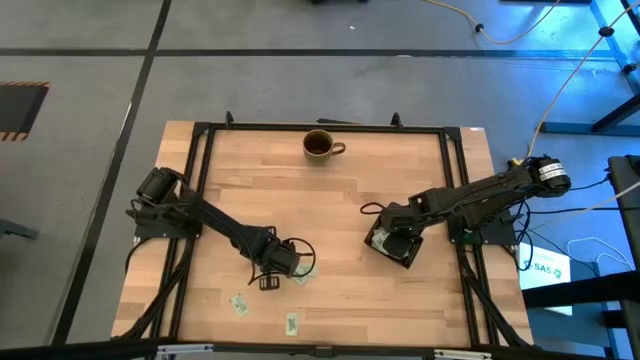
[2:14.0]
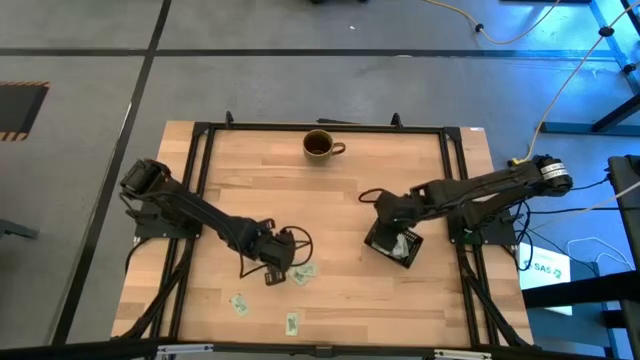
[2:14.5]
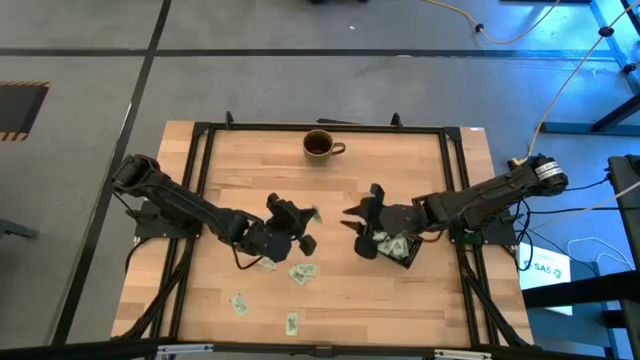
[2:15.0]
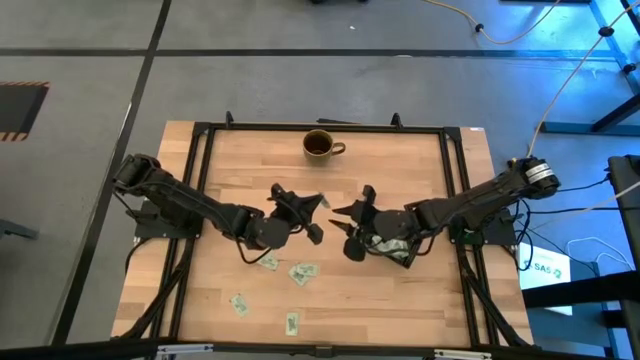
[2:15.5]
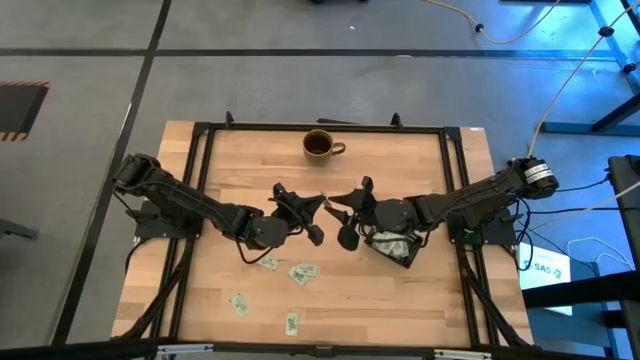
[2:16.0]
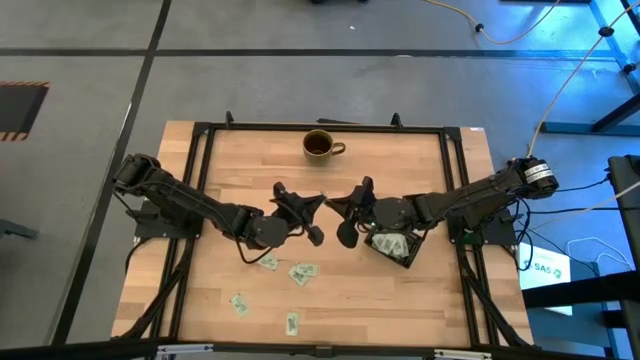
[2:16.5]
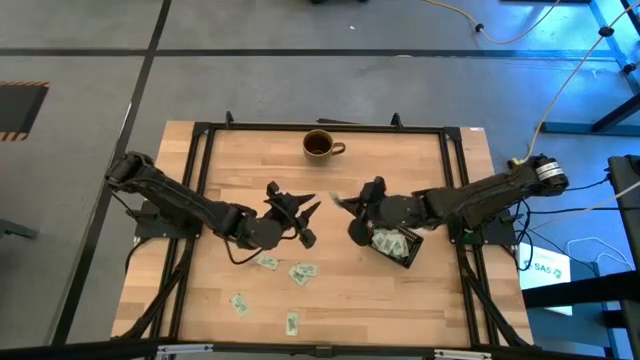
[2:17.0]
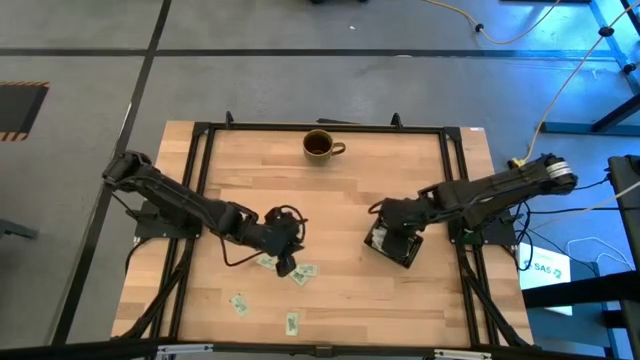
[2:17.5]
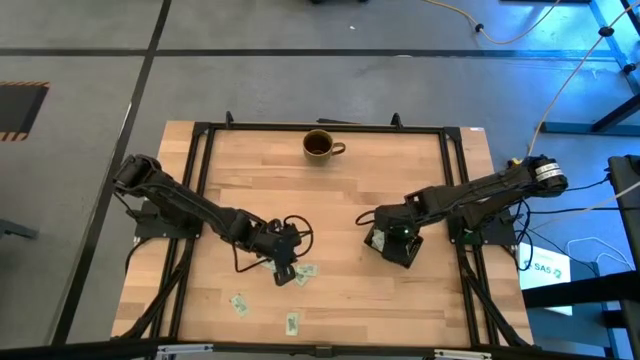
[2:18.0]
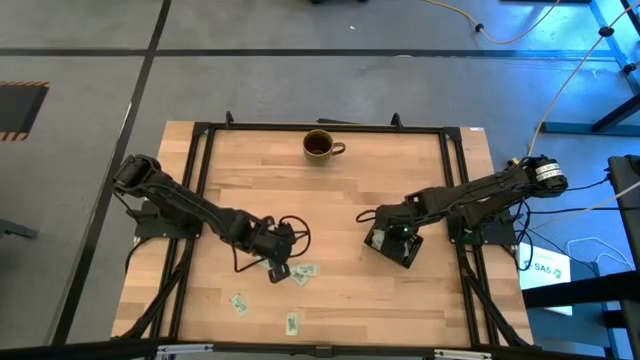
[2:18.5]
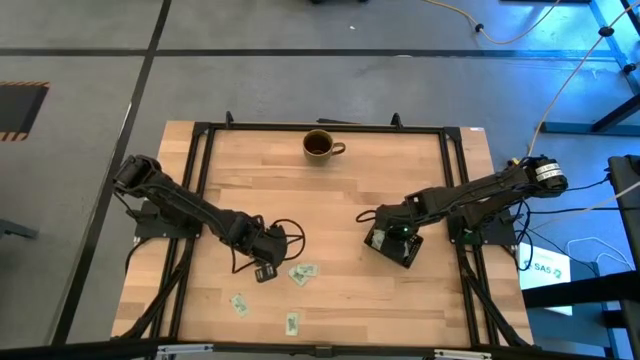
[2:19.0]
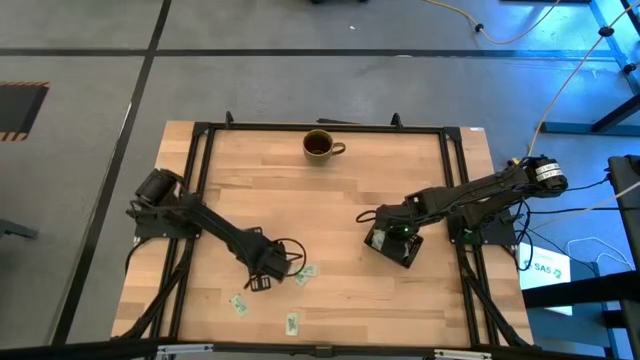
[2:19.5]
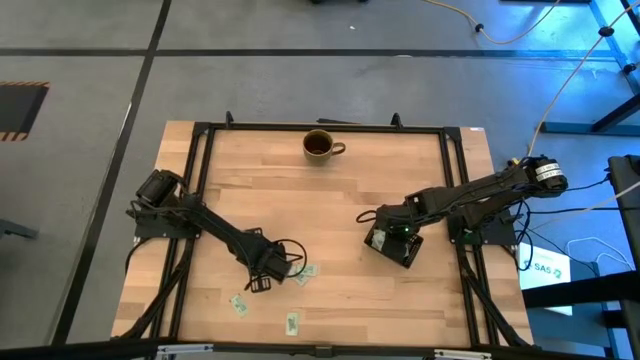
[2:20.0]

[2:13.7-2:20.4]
Task: Pick and place Stevia / Truvia into bins
Put the stevia packet into the black bin

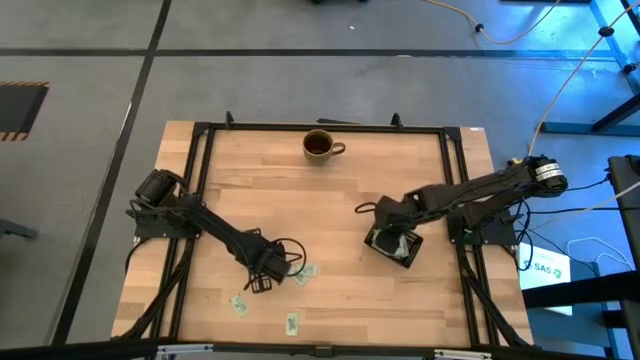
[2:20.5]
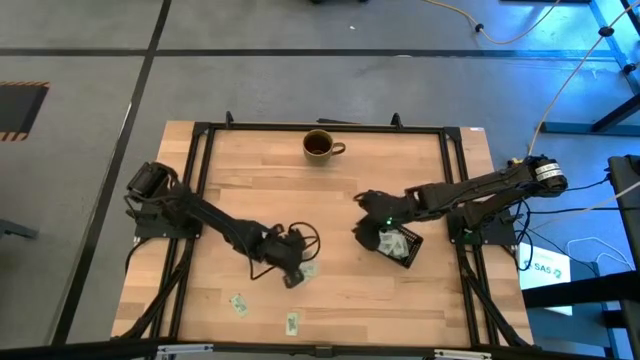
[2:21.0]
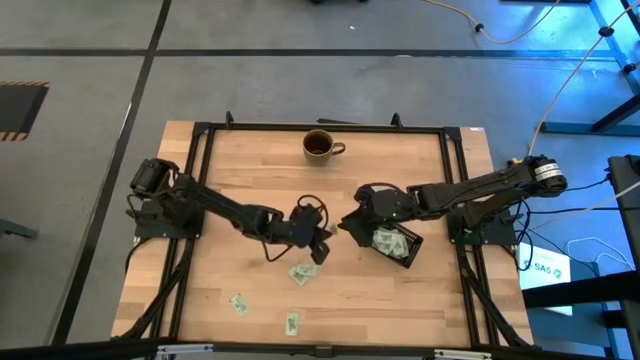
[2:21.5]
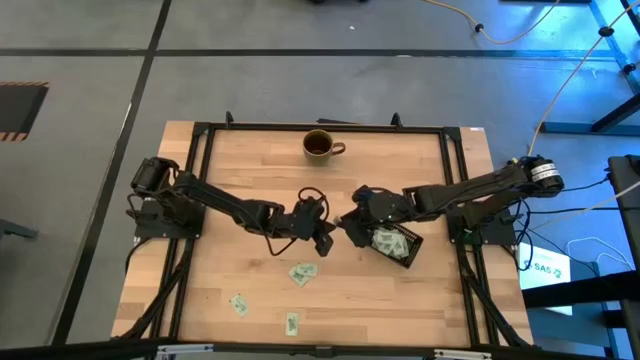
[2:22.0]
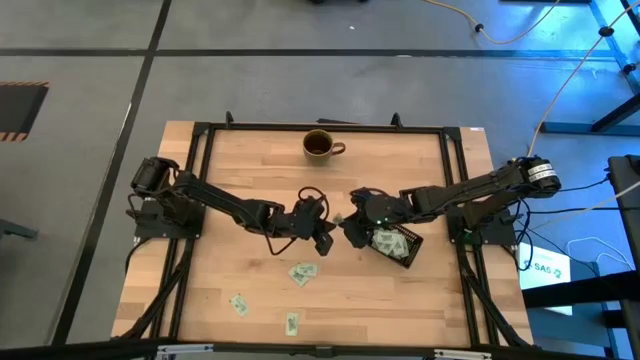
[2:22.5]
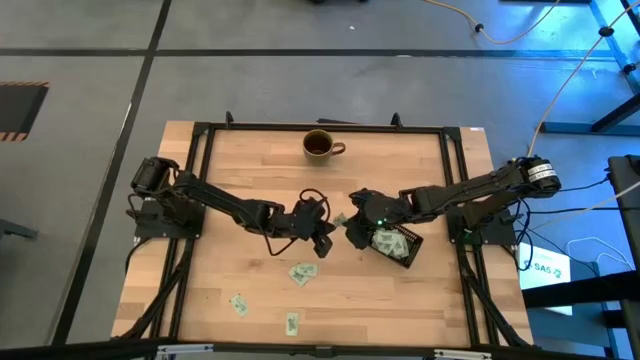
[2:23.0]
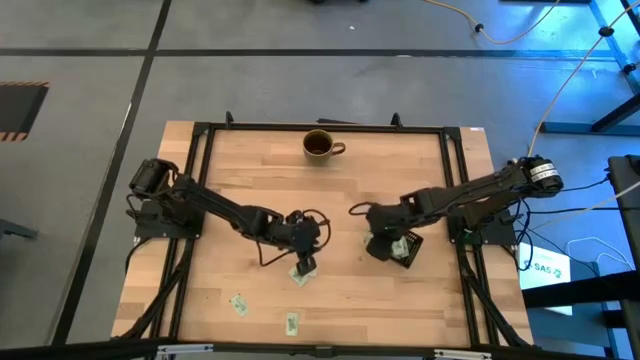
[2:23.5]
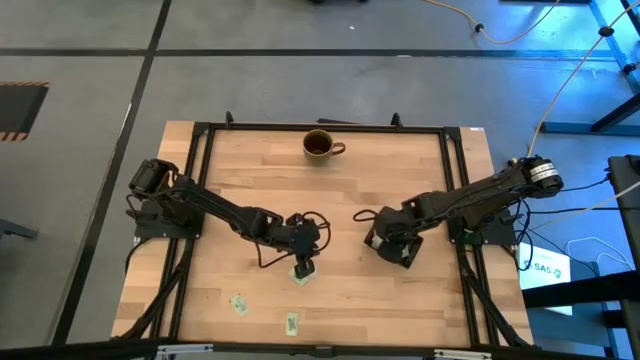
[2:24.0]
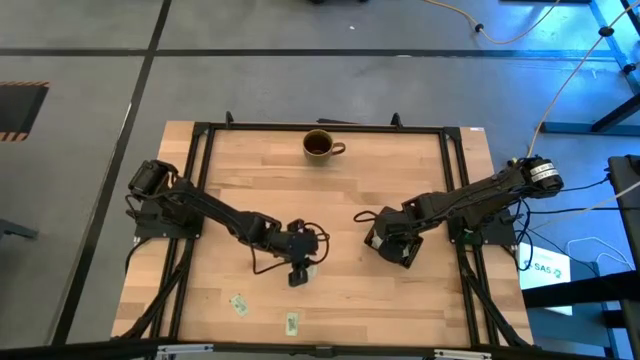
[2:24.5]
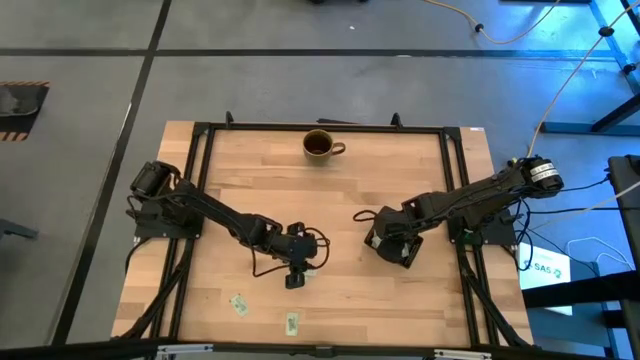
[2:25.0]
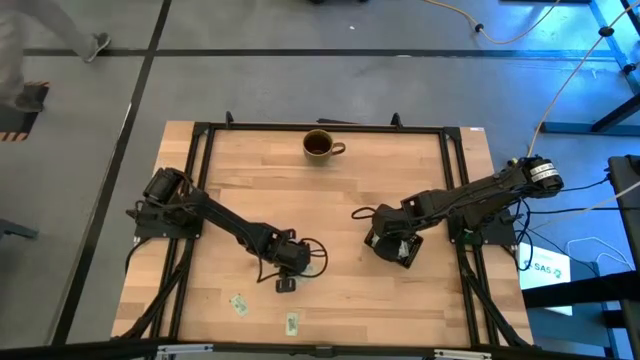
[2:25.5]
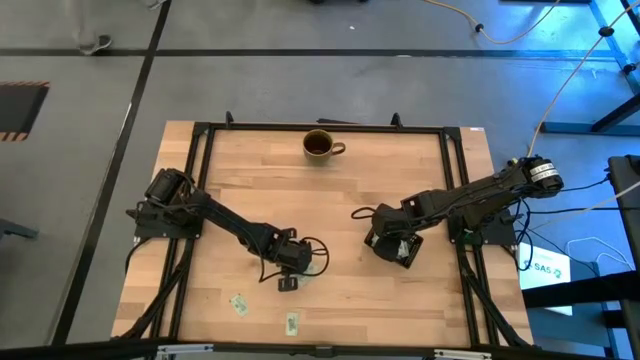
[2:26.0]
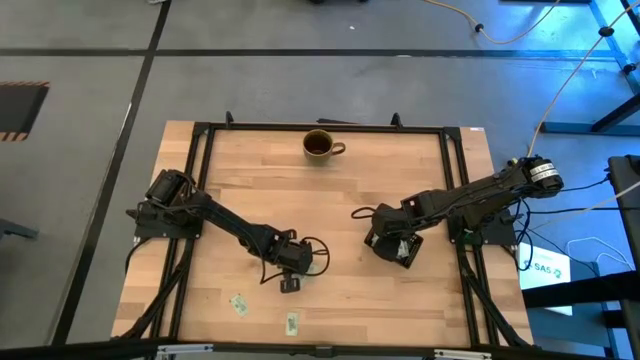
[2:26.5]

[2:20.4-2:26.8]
Put the stevia packet into the black bin

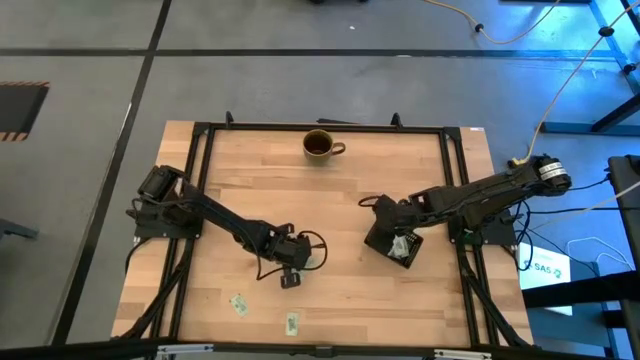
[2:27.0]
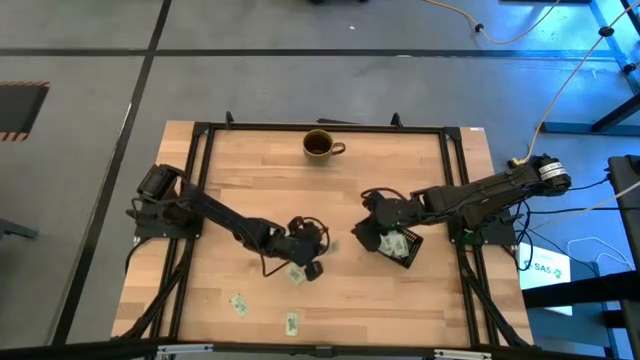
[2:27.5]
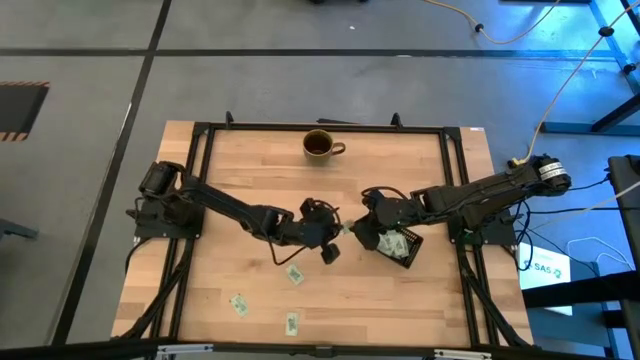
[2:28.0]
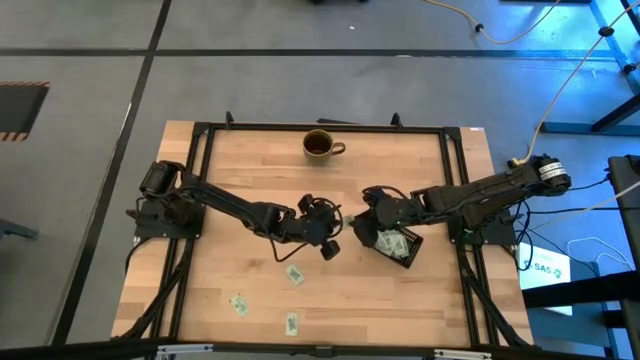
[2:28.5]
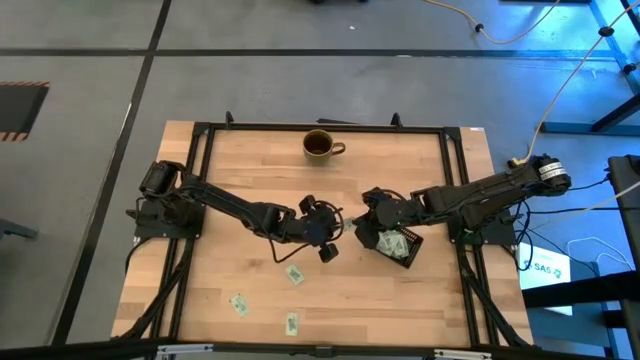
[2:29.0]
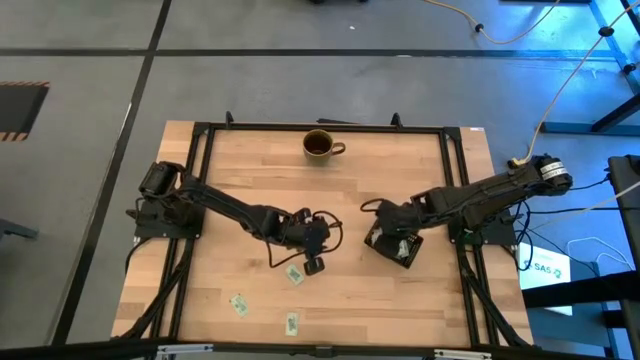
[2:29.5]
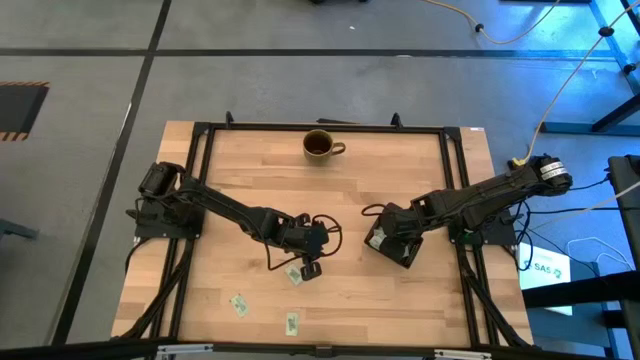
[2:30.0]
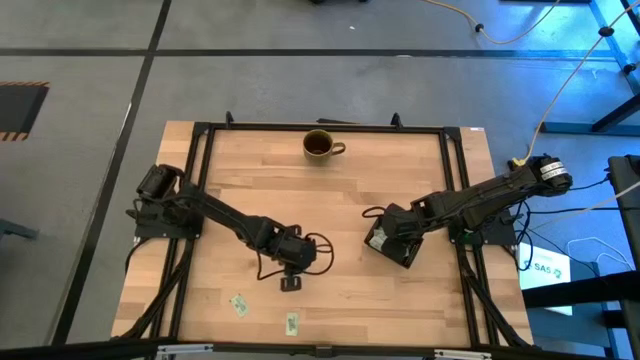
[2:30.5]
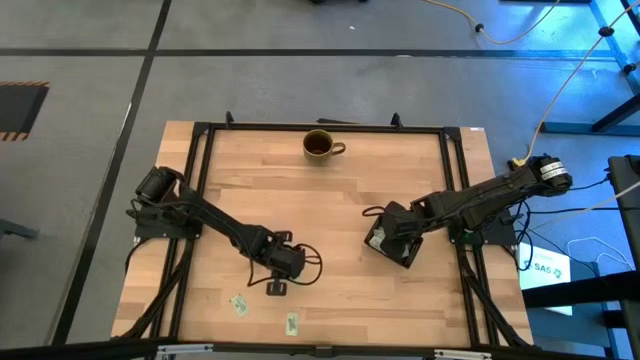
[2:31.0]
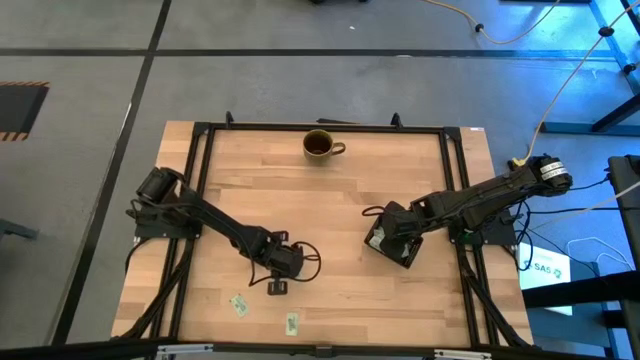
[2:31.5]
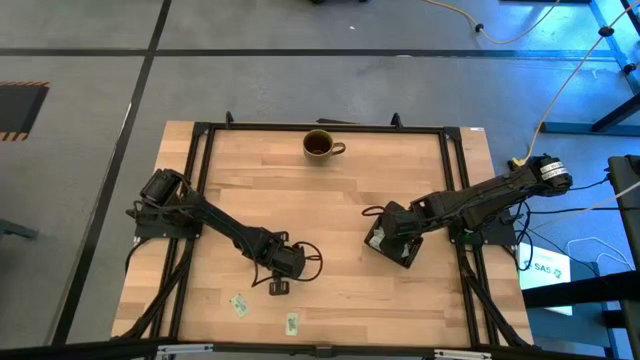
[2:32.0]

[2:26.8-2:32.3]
Put the stevia packet into the black bin

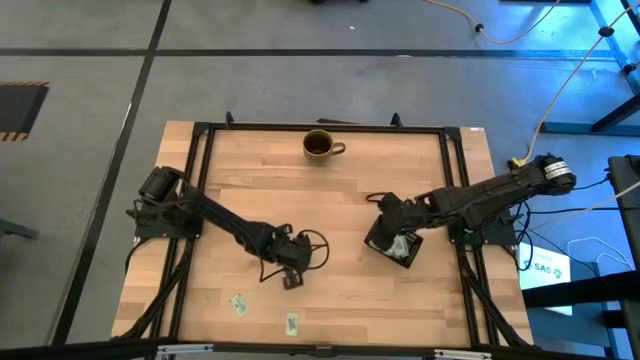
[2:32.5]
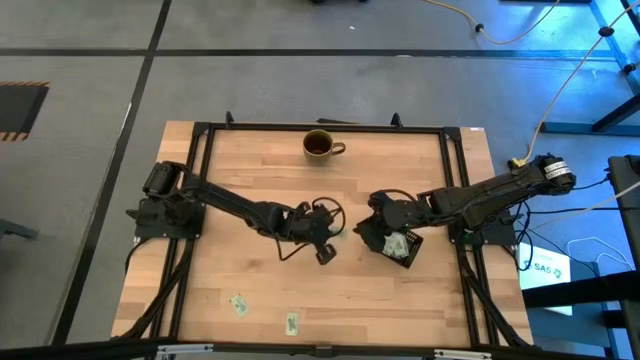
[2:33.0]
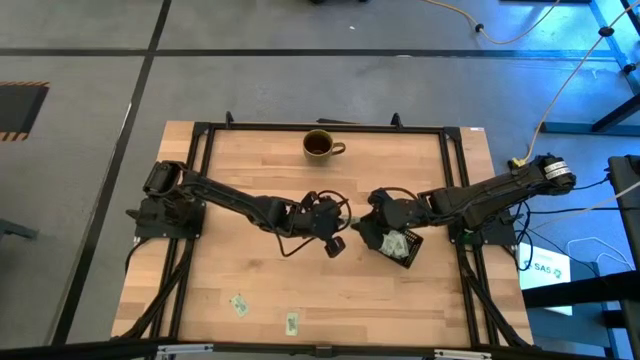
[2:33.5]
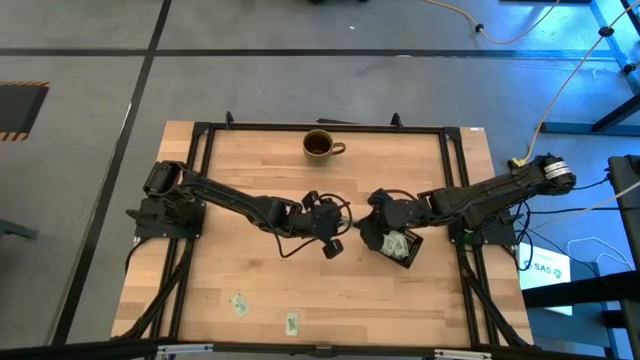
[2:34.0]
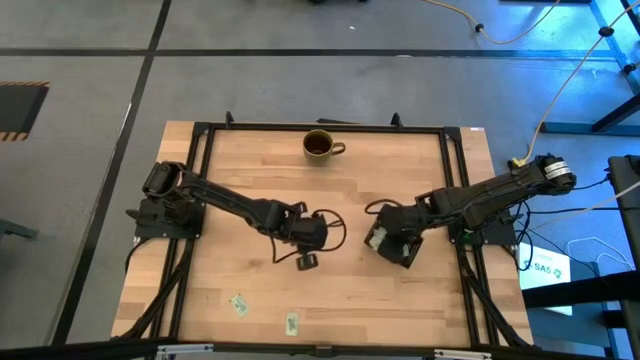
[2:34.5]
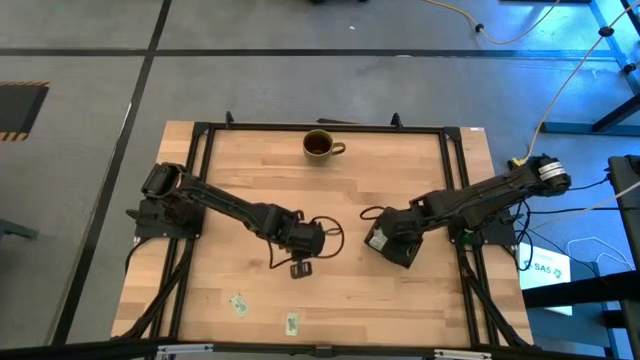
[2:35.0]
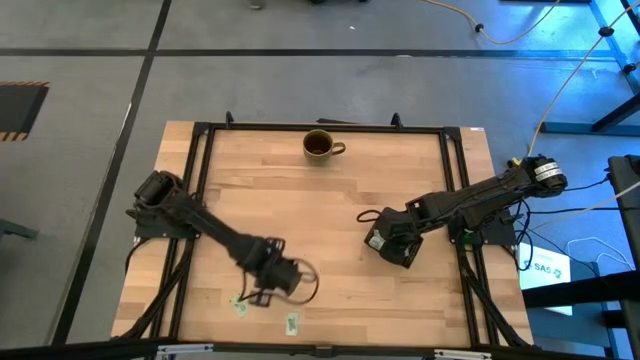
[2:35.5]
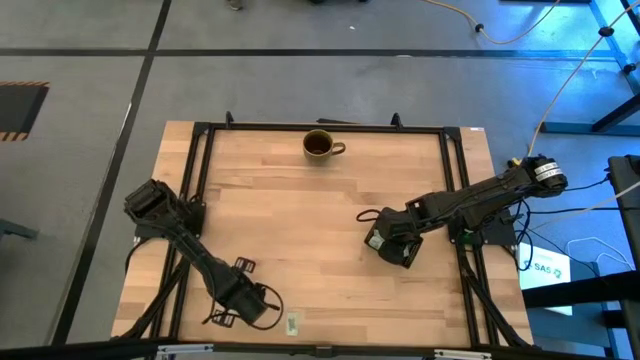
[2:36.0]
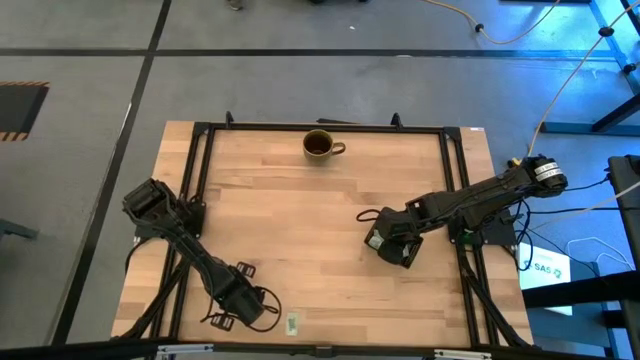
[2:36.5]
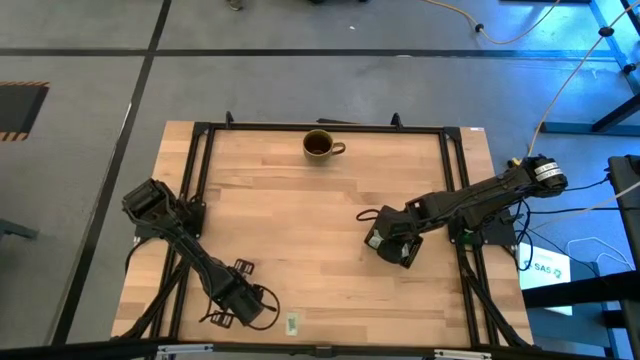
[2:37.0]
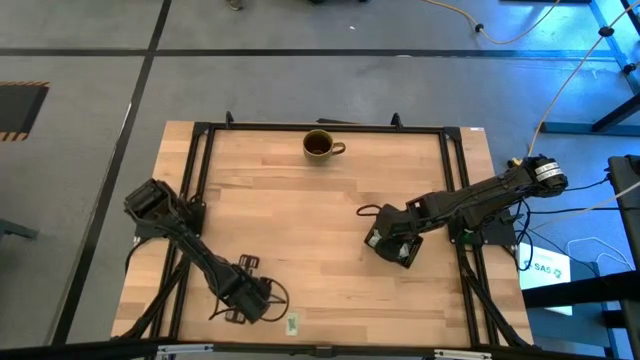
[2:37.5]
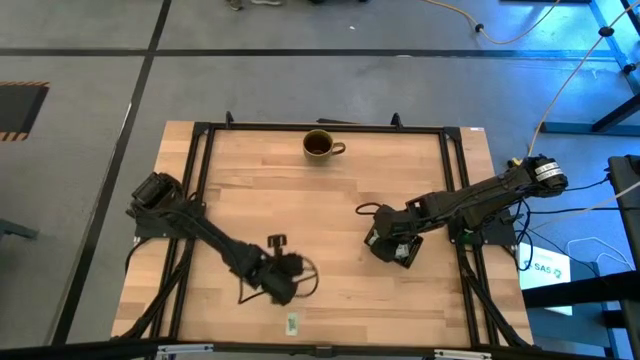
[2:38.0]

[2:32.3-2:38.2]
Put the stevia packet into the black bin
